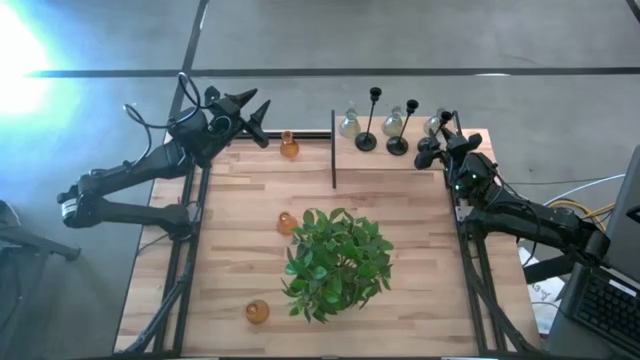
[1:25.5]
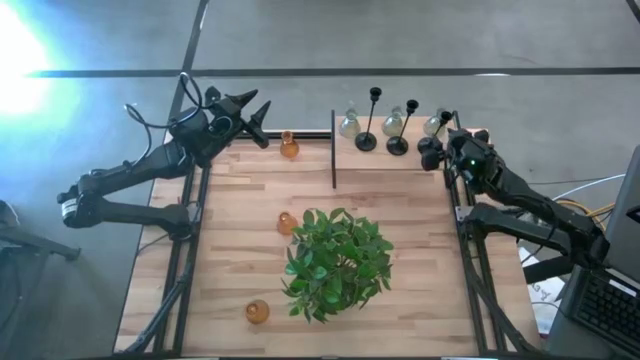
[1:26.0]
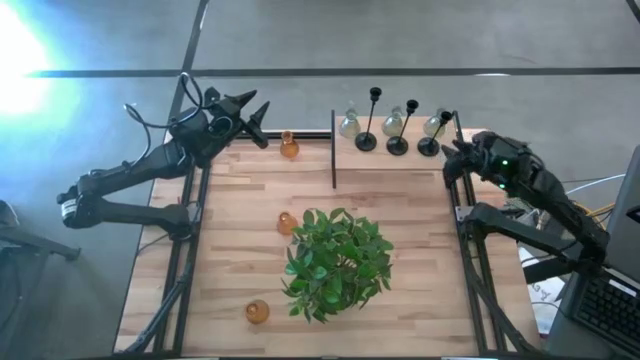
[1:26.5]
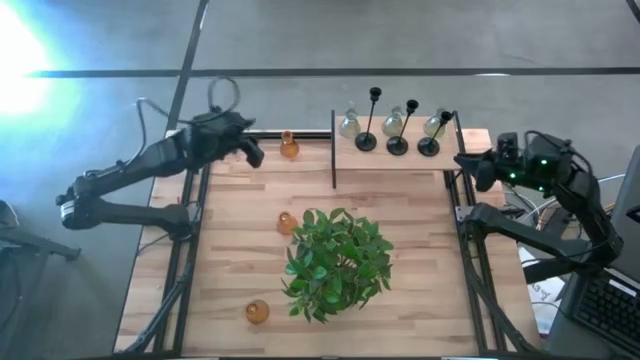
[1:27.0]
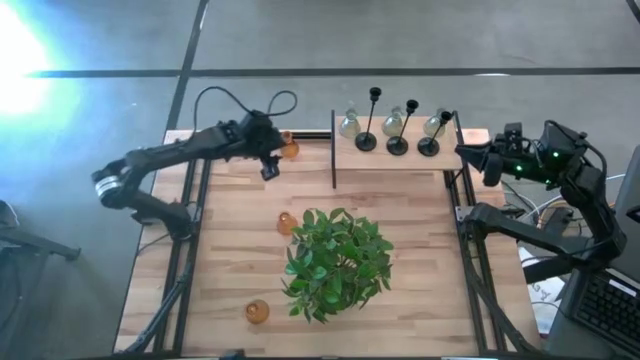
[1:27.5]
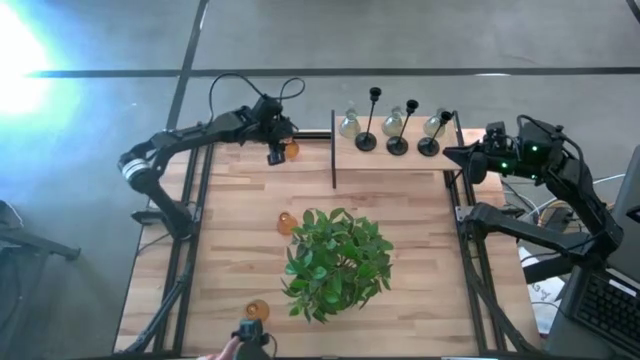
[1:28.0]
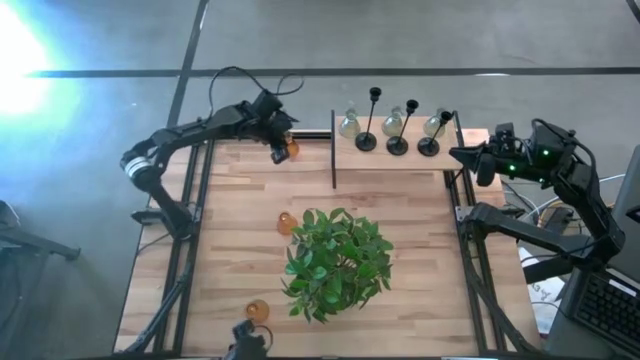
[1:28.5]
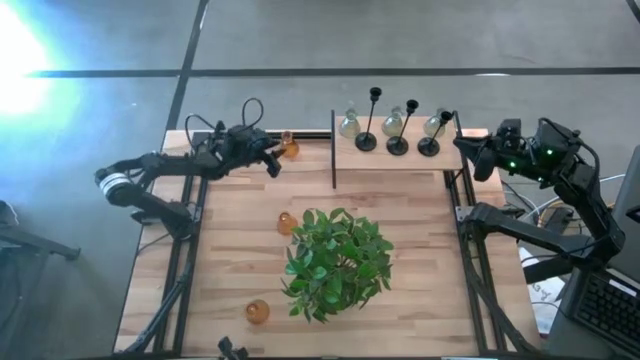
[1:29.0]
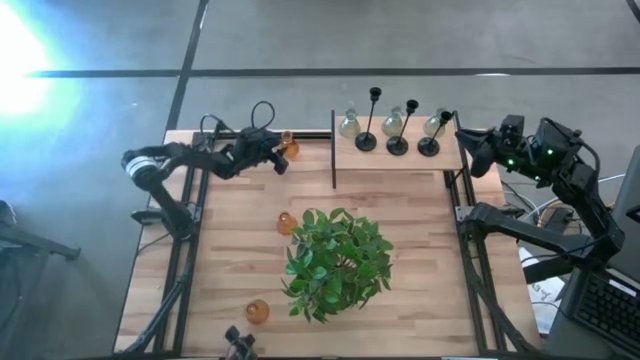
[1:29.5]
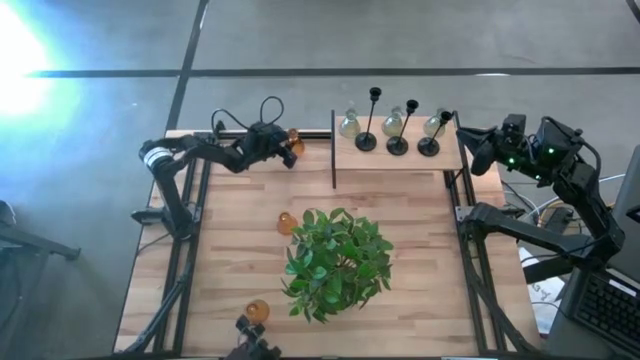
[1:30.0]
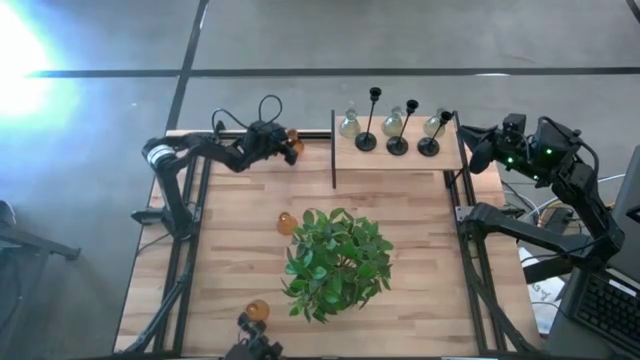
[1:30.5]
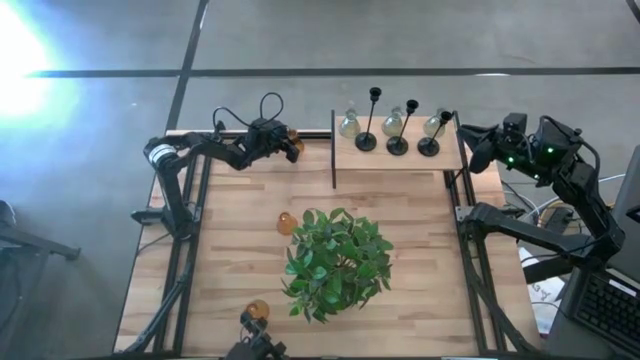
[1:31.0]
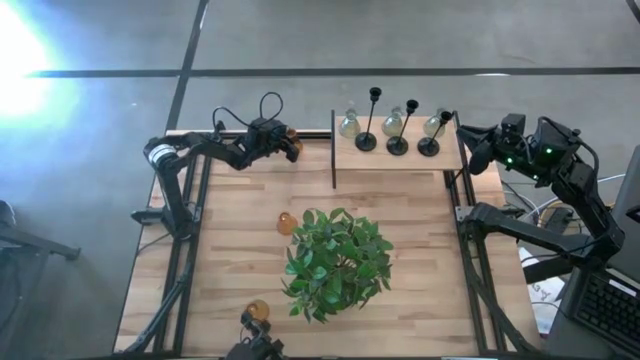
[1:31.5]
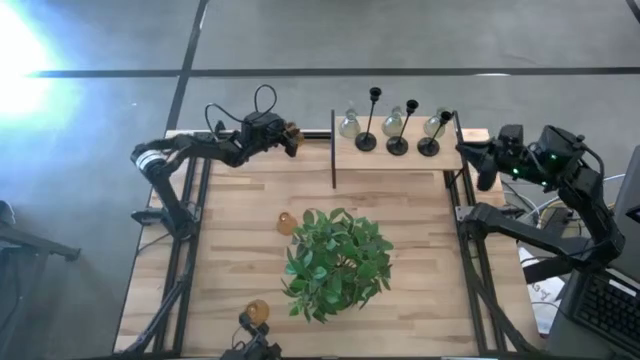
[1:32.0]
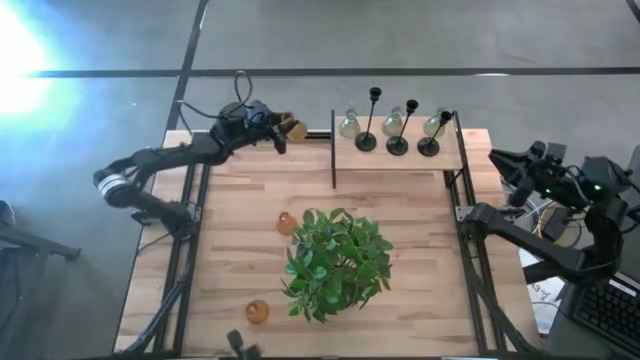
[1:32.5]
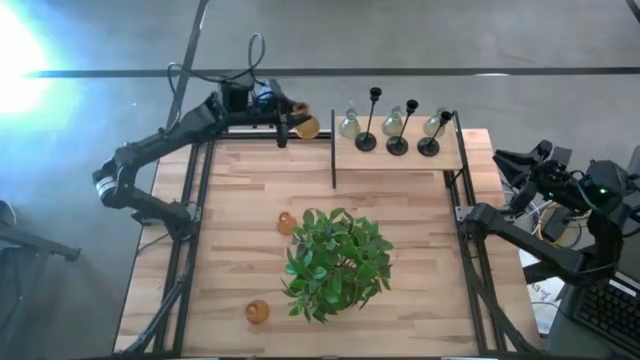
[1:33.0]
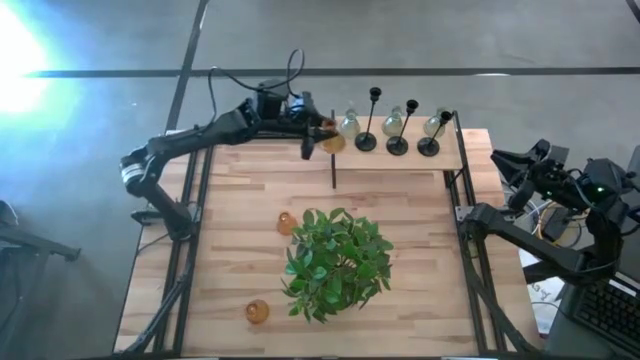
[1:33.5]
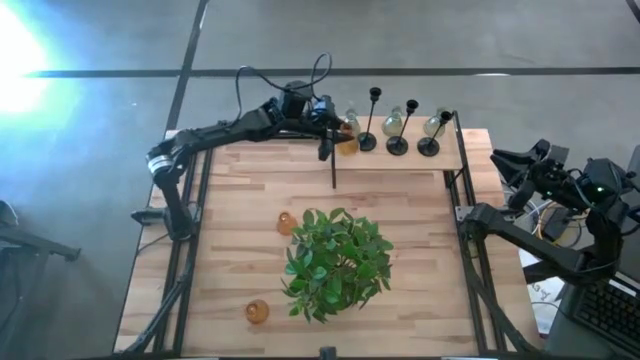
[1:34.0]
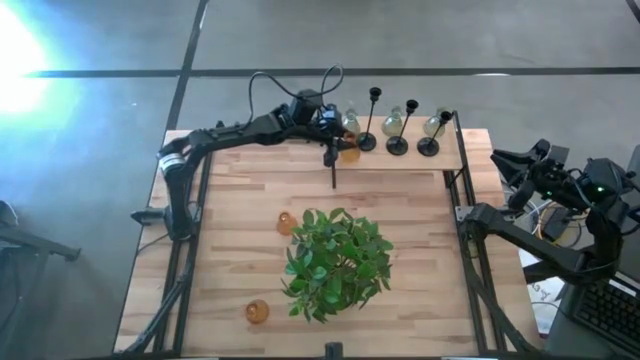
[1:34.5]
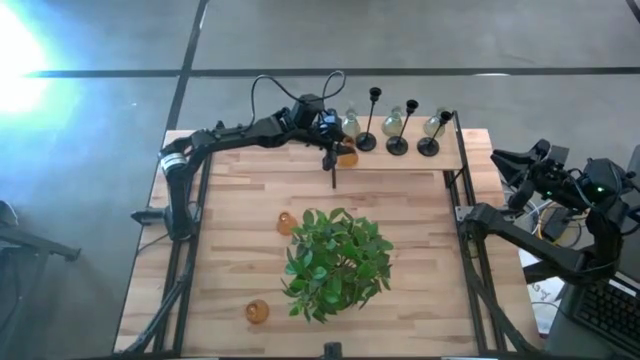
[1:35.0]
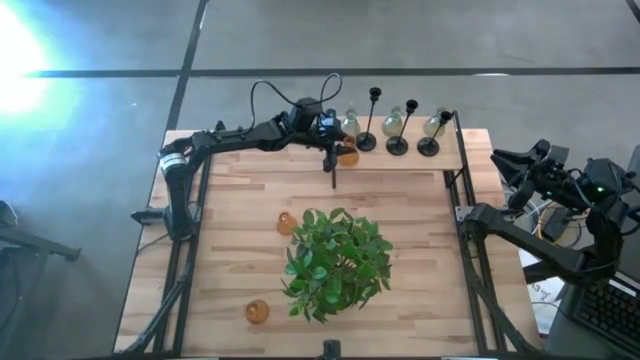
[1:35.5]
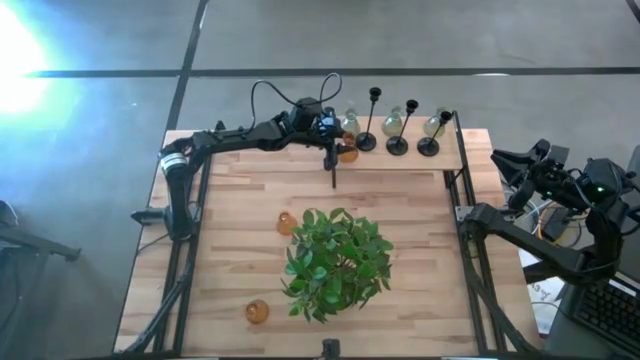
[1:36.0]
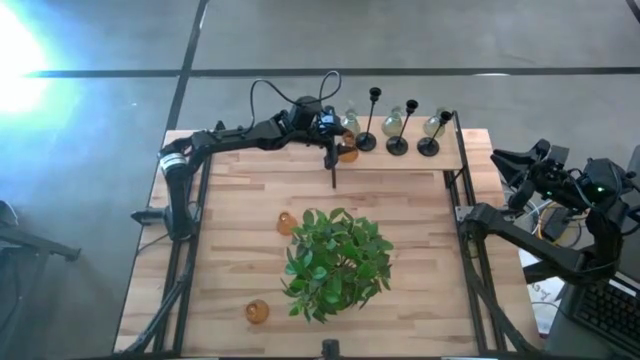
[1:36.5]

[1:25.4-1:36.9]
Task: Pick & Place candle stick holders
Put the top yellow glass candle holder on the shelf

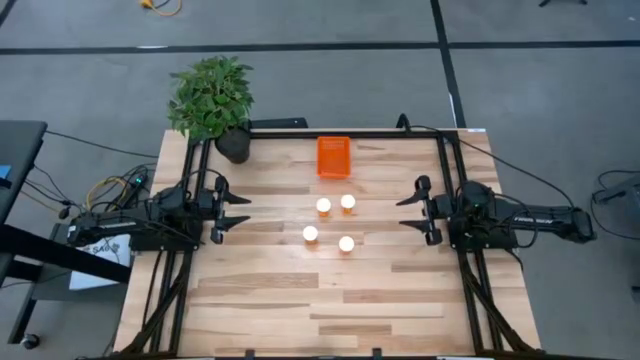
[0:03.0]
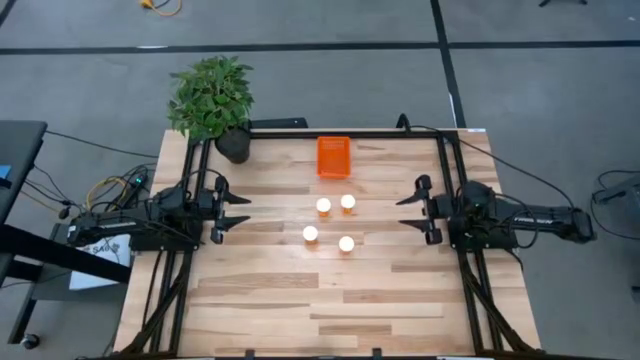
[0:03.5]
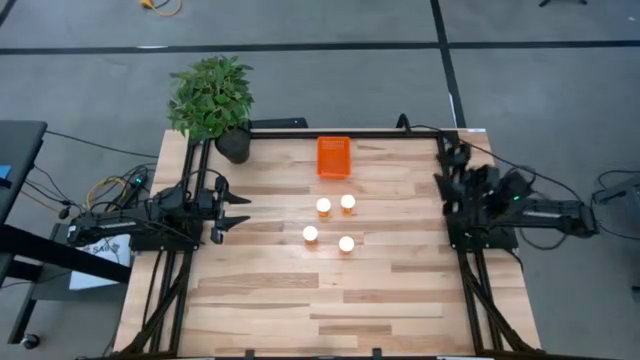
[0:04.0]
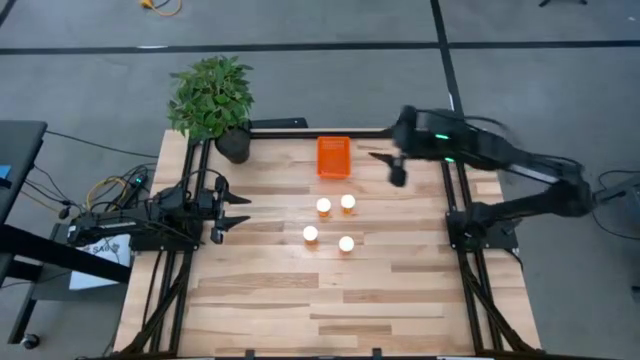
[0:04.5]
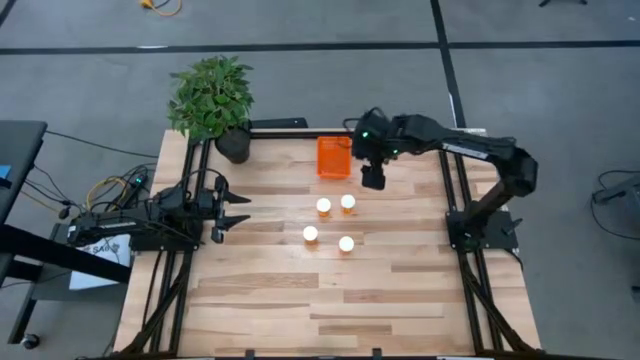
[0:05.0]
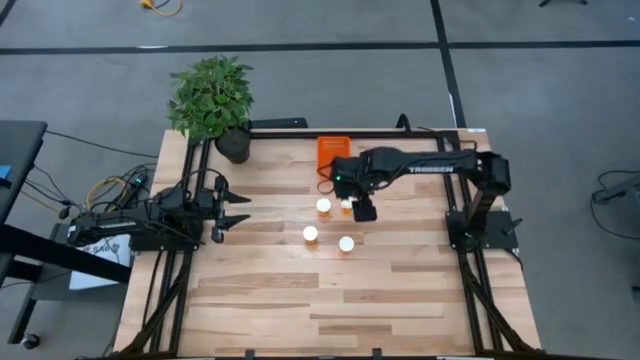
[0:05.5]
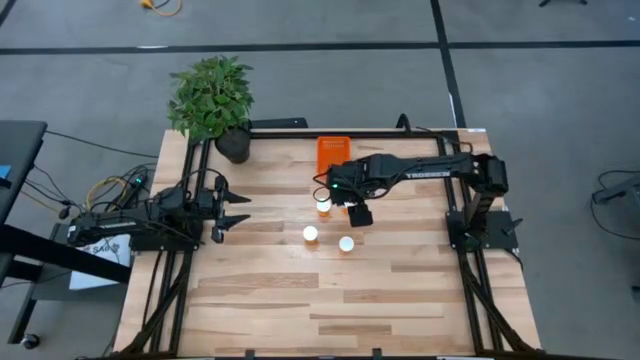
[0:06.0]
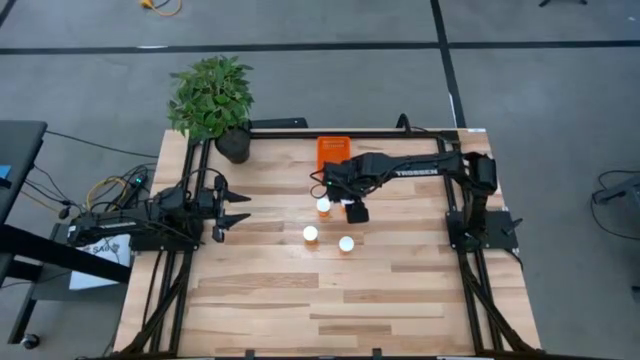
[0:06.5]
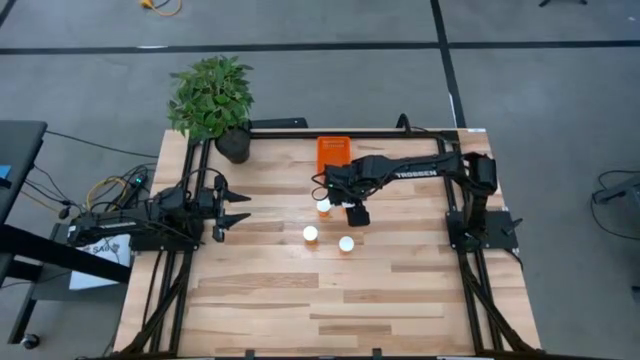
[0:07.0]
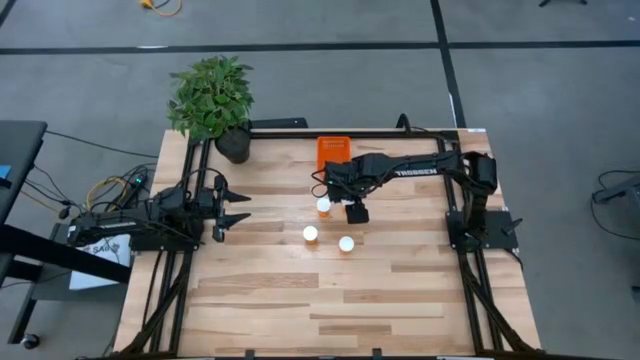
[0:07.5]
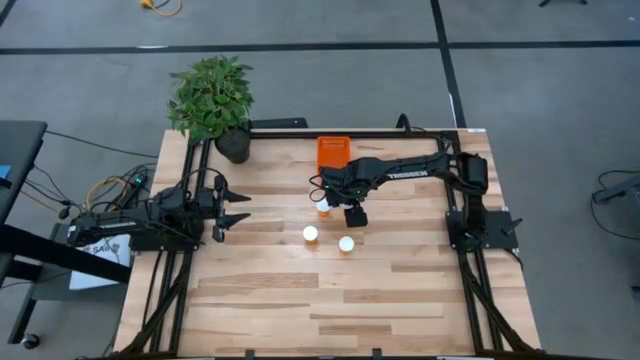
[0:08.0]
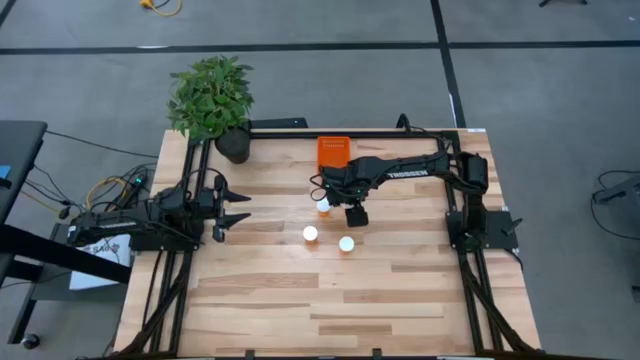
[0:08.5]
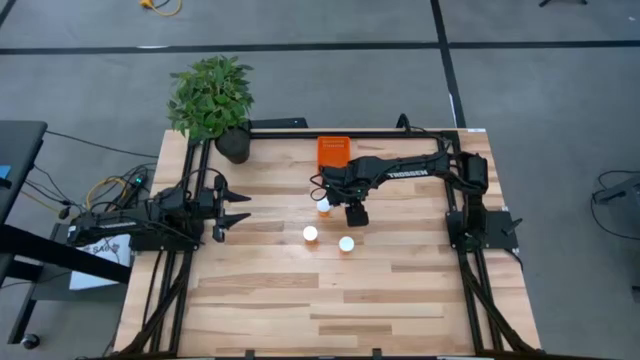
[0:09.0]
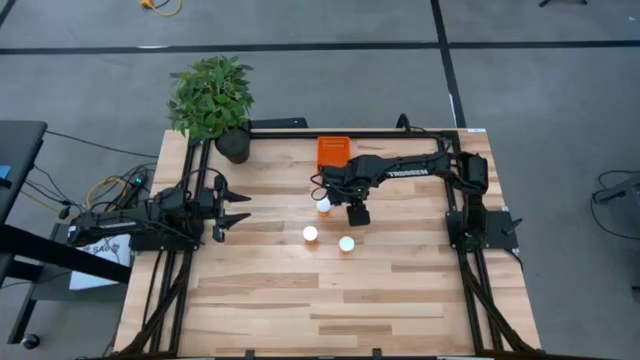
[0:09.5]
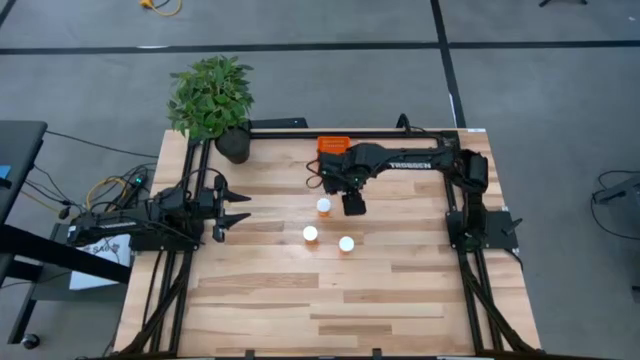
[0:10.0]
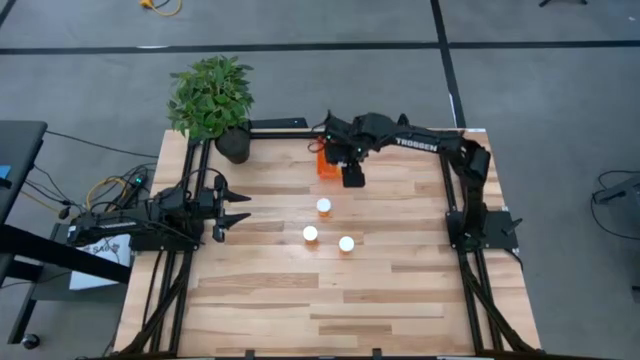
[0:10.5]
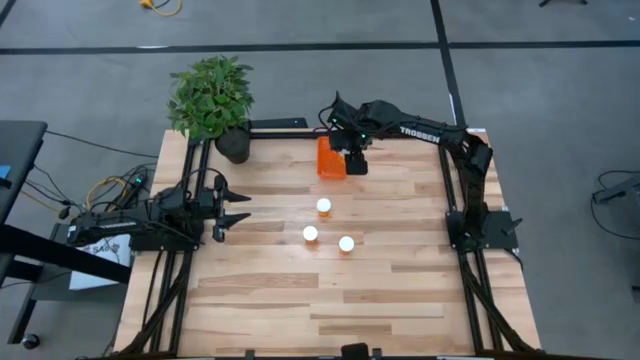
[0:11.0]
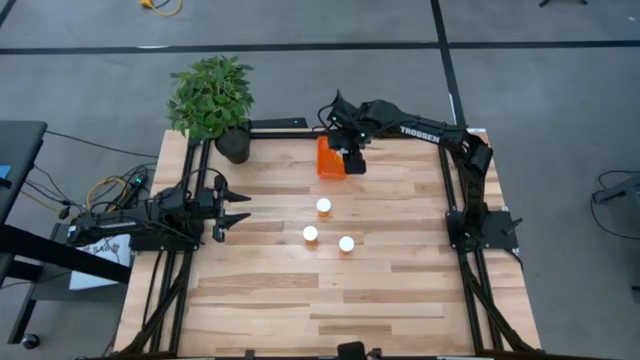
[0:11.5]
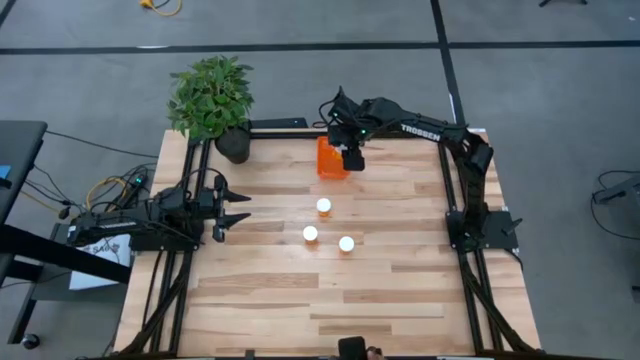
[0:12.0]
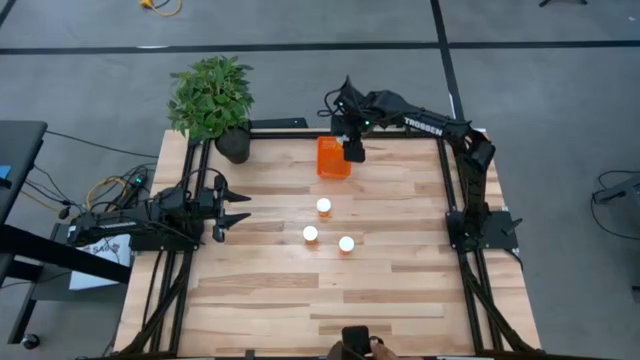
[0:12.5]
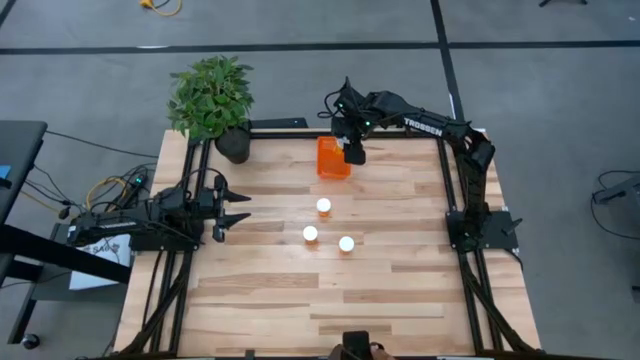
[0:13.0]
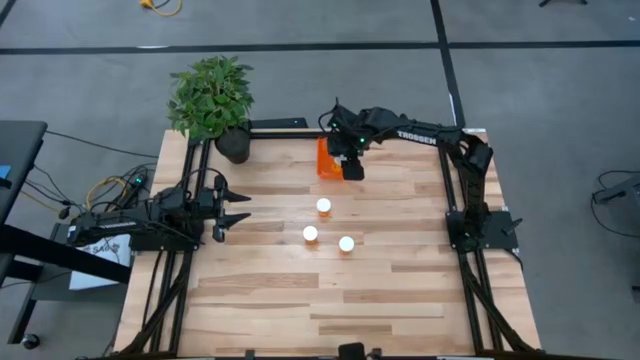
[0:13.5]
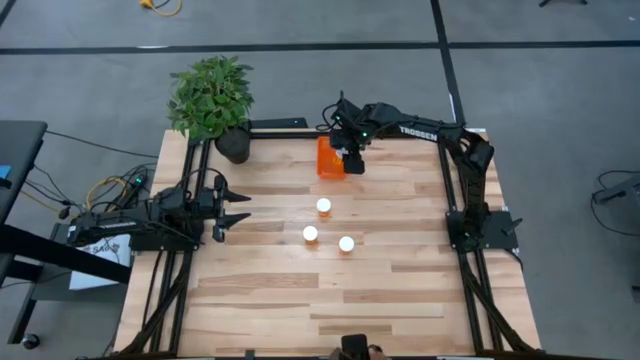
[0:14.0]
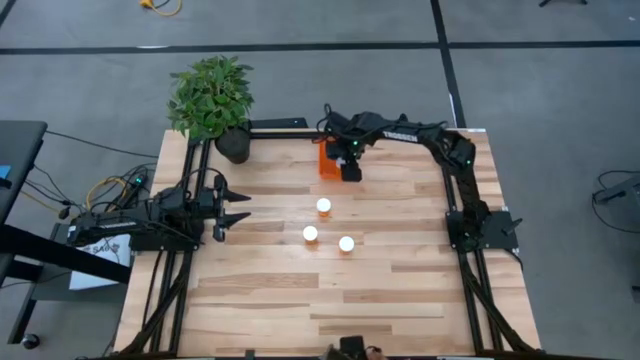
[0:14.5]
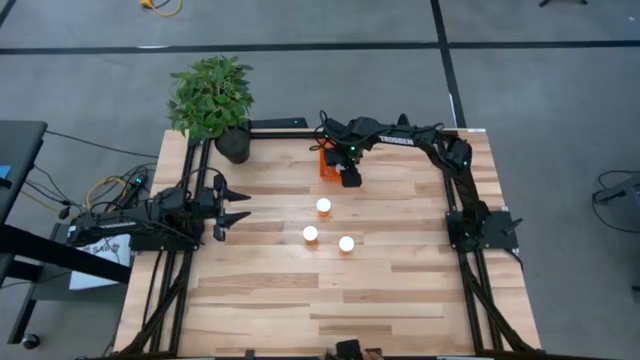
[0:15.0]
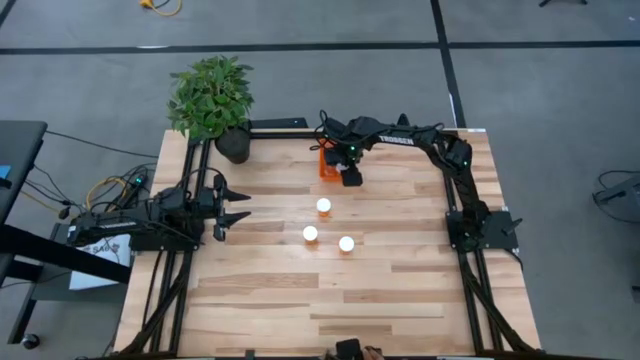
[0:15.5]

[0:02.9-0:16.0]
Task: Pick and place pill bottles into a basket
Put the orange pill bottle into the orange basket
